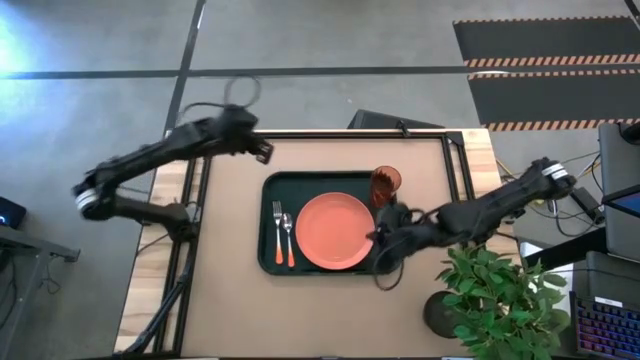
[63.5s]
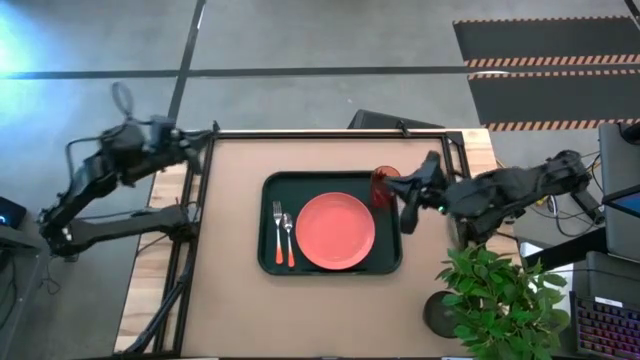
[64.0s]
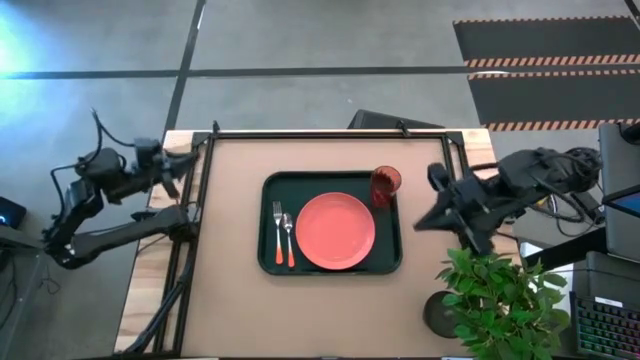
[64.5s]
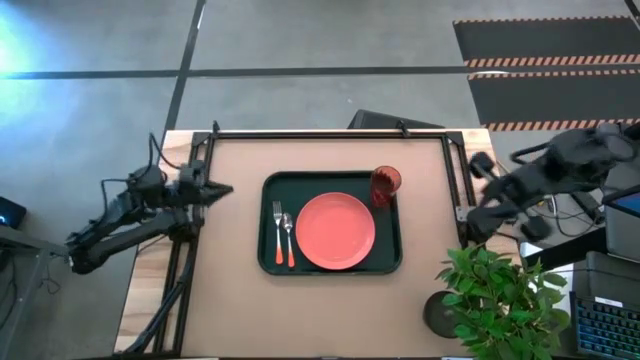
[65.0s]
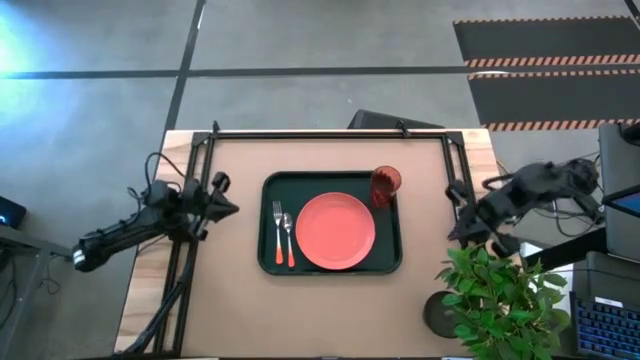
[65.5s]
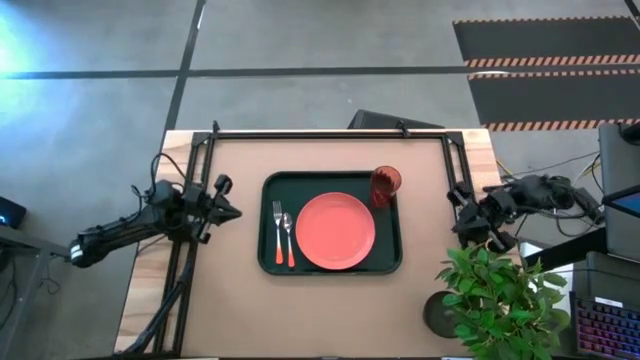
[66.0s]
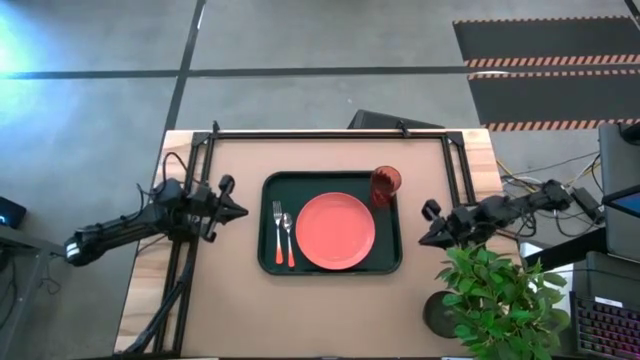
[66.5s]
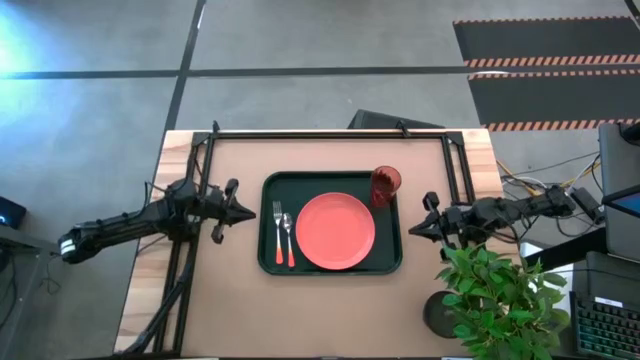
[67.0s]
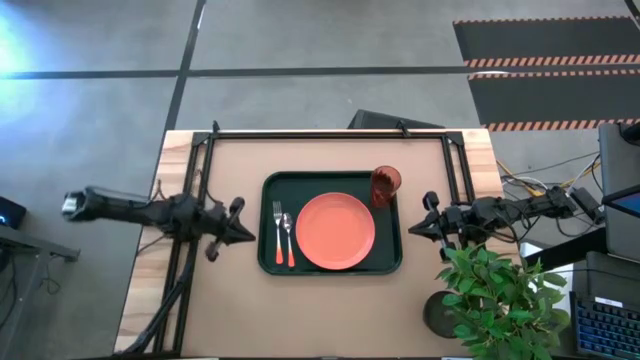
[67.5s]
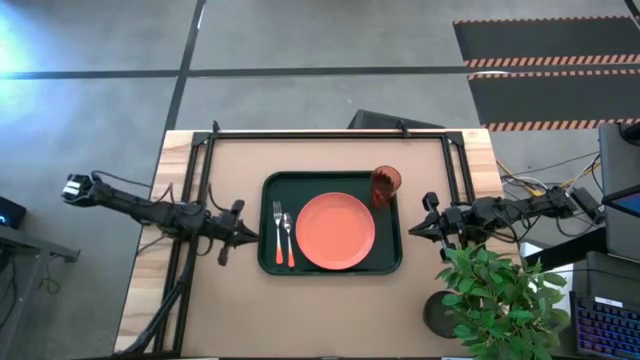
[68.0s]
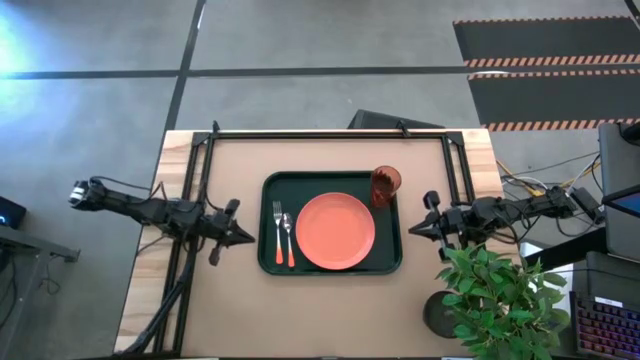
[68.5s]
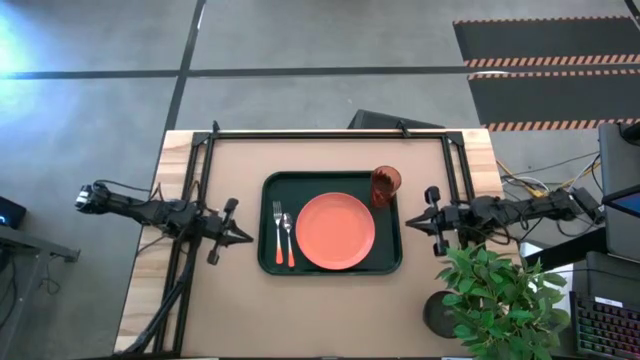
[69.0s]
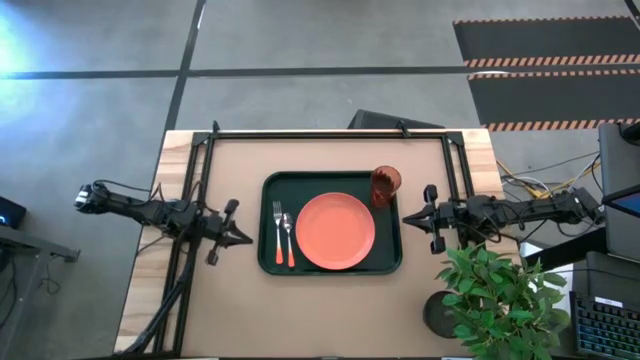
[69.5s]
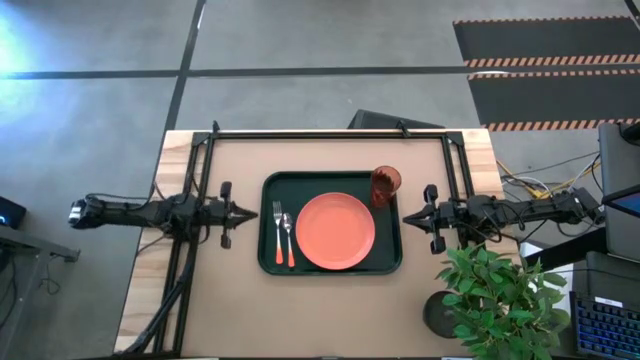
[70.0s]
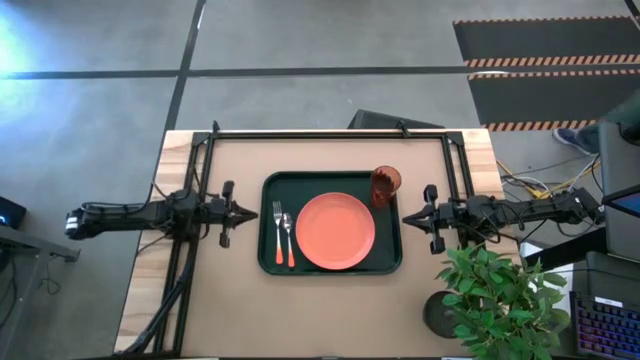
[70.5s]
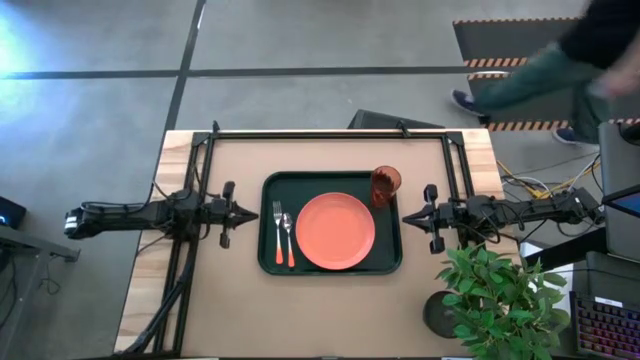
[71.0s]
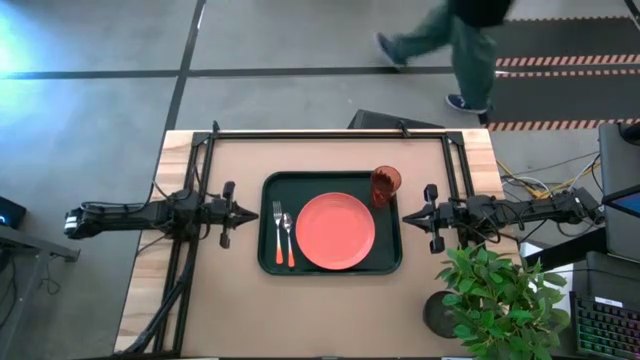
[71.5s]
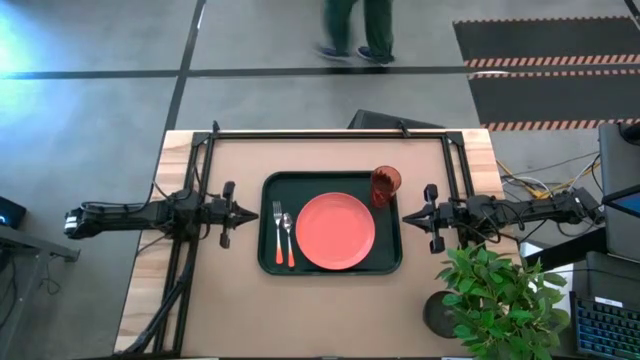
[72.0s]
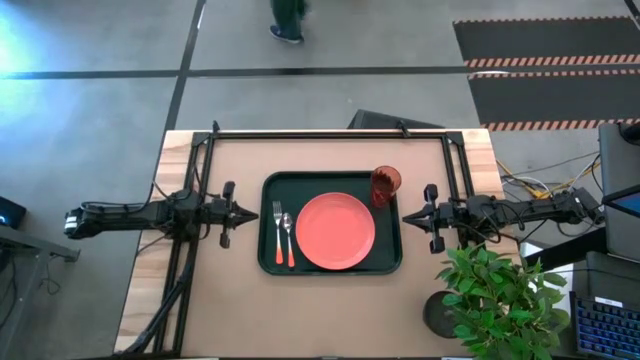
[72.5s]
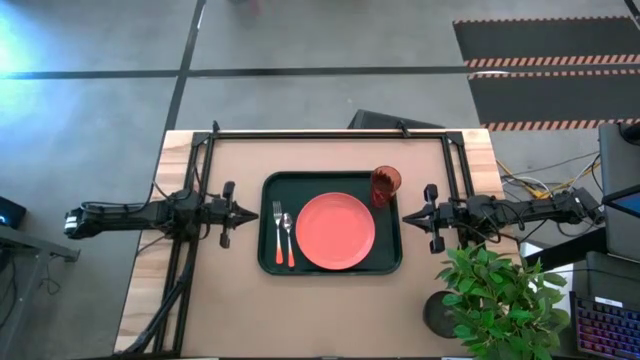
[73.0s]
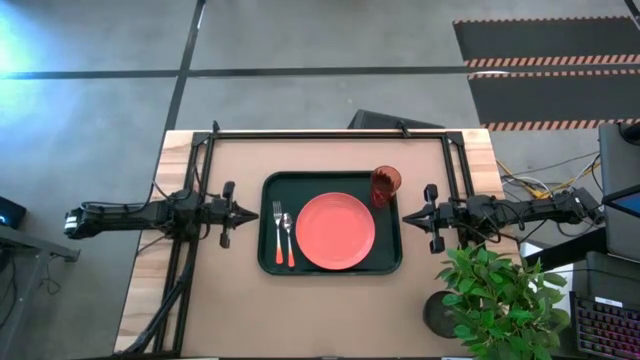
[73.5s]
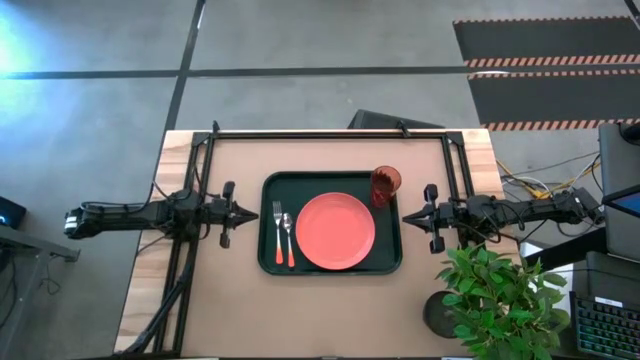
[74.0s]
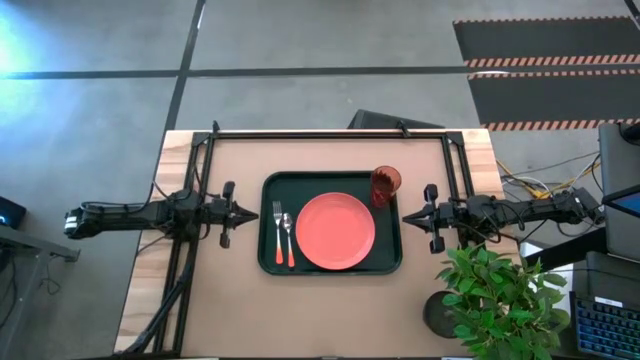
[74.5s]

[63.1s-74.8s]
Task: Pick and place plate/cup/fork/spoon on tray
Return to Home Position

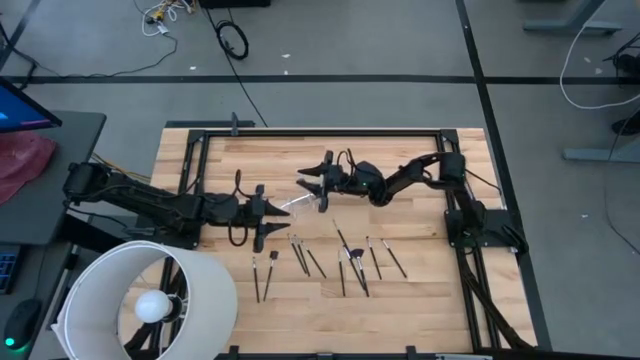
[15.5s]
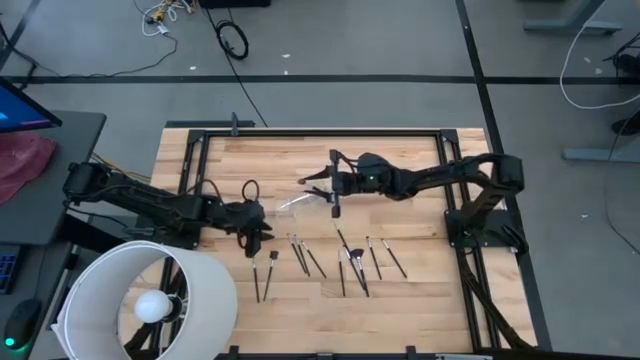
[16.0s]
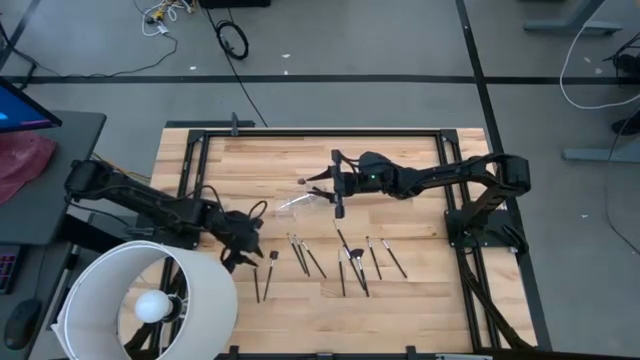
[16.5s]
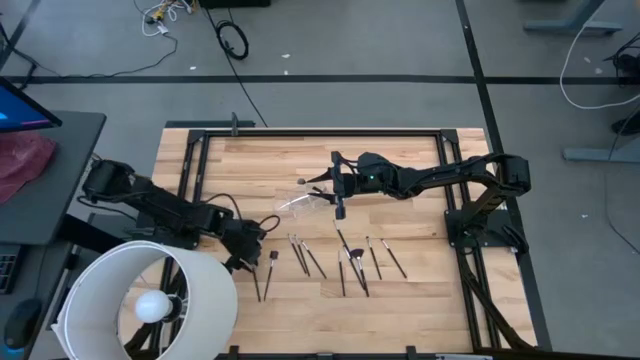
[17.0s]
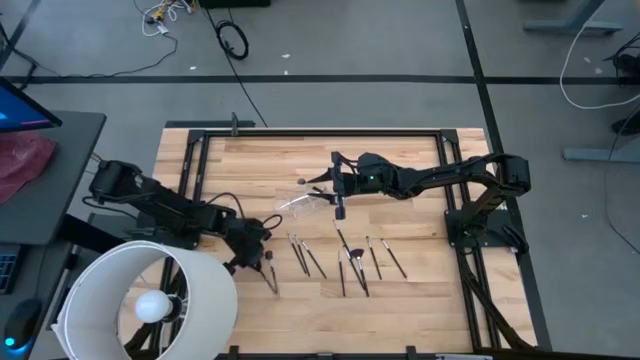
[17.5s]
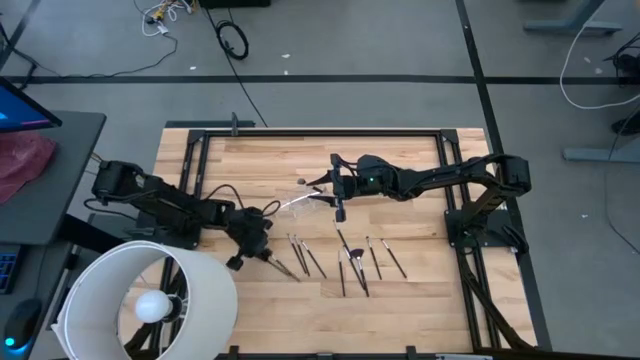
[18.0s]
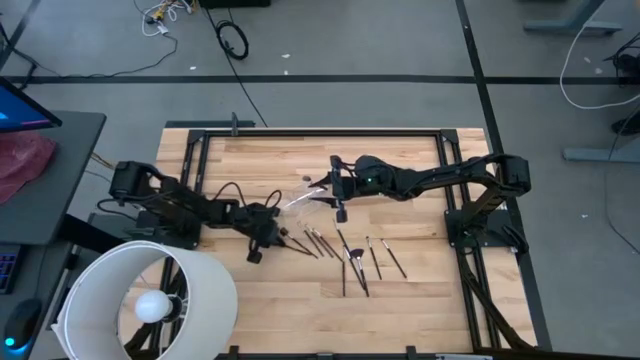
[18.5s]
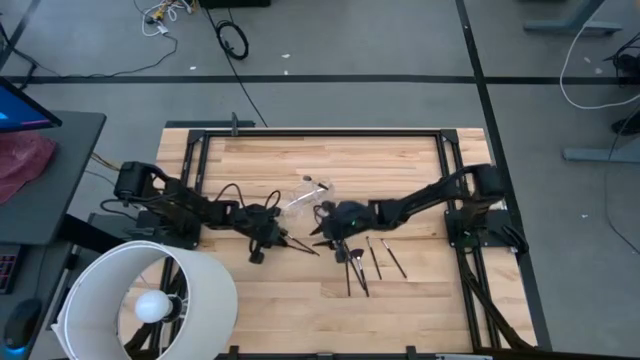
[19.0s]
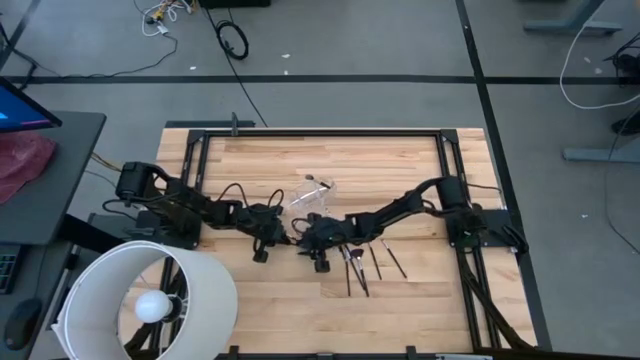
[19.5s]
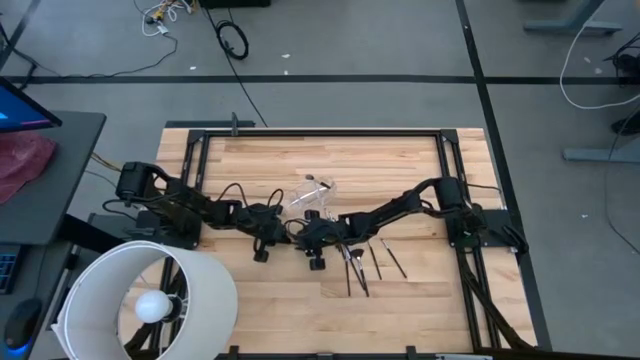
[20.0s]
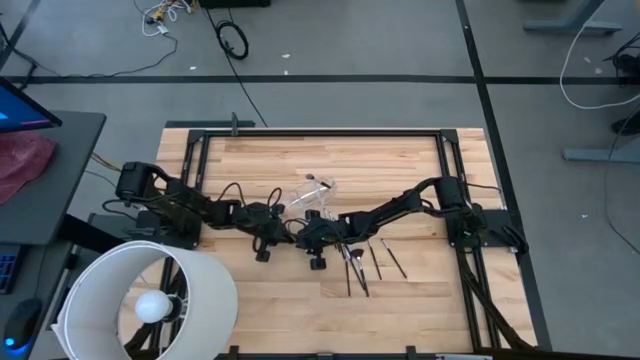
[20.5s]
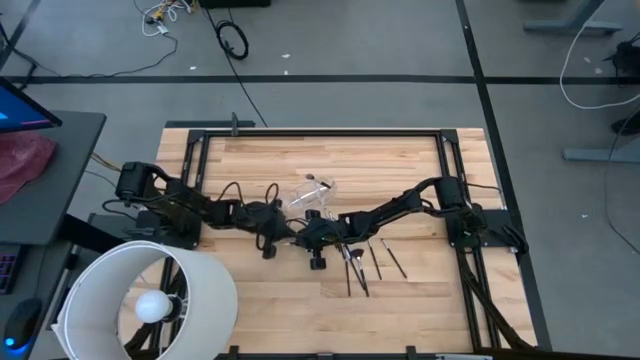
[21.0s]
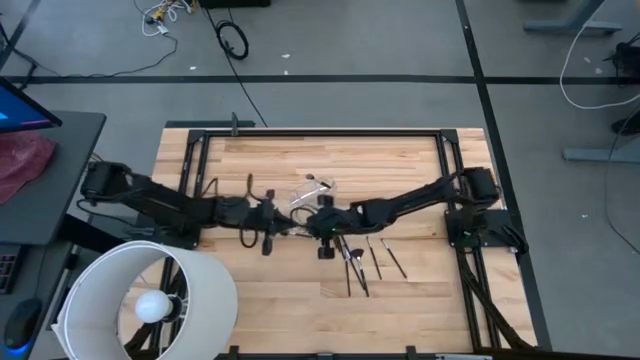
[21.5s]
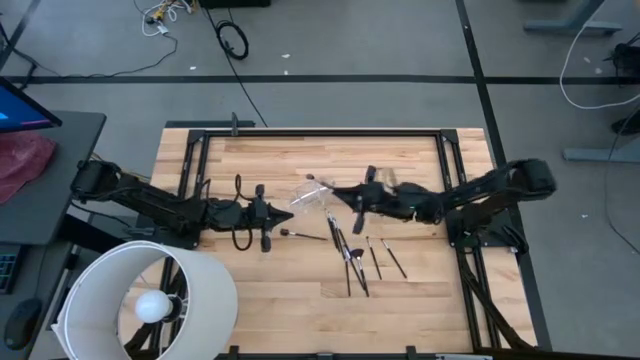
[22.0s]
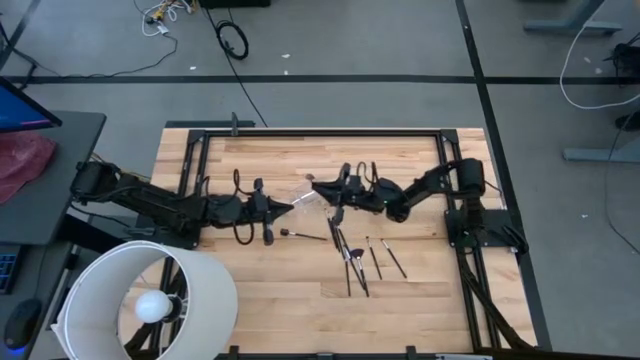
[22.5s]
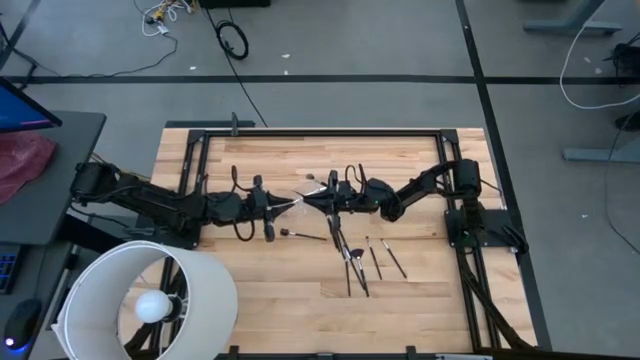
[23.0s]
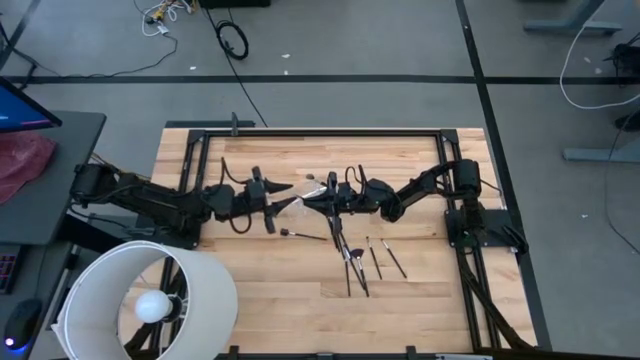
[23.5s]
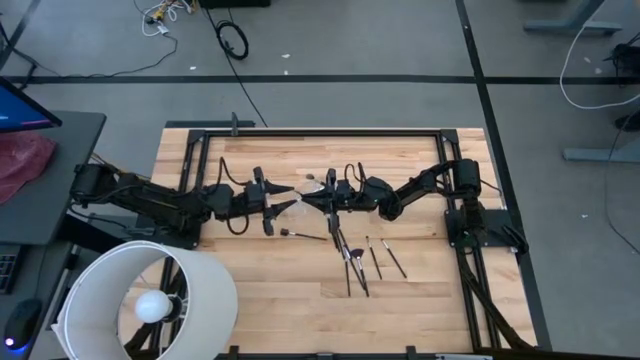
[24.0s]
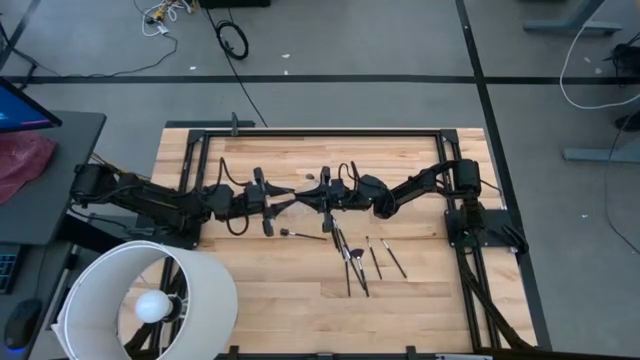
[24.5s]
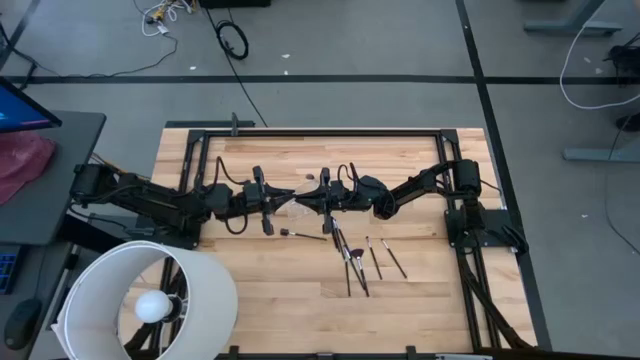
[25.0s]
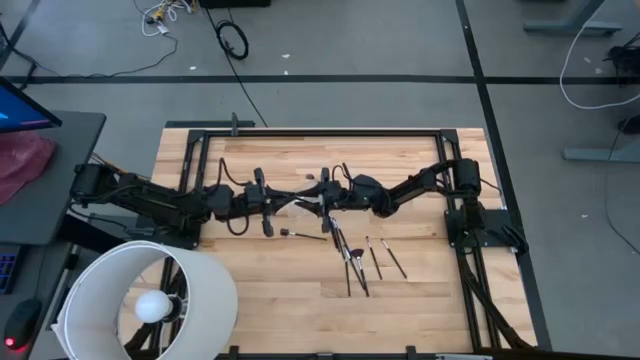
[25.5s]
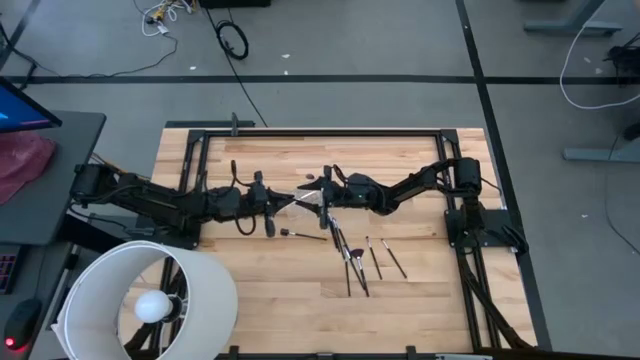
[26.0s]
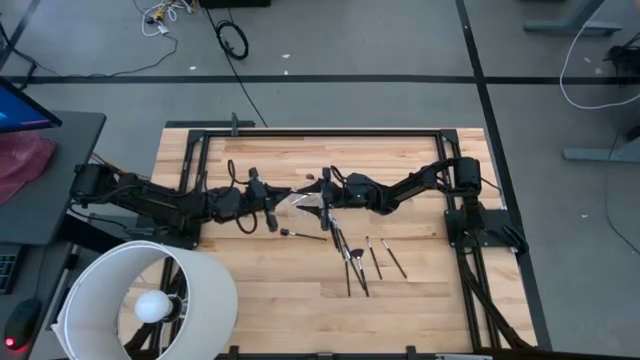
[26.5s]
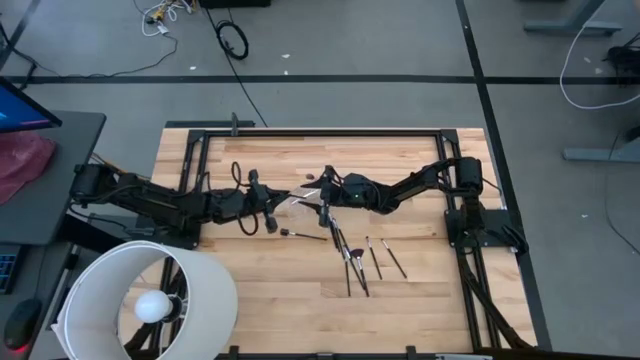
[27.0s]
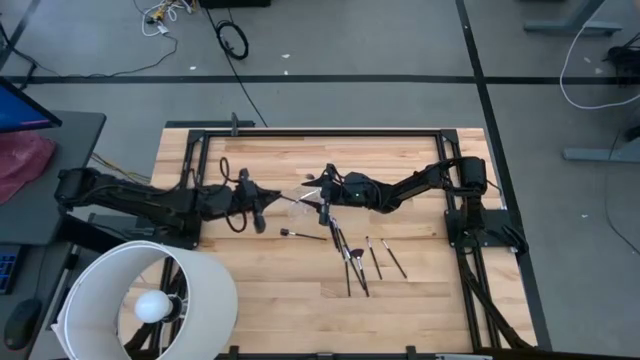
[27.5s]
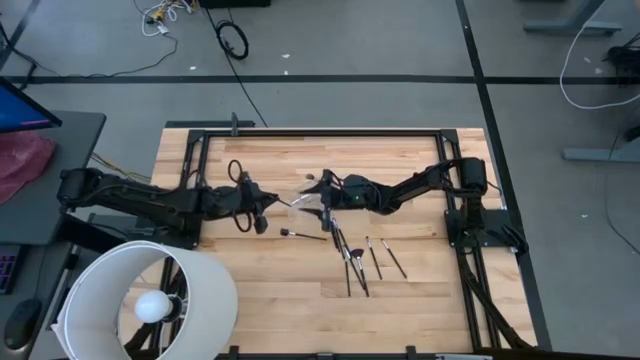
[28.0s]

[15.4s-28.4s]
Task: Put items in baskets/containers
Put the black eyeshadow brush into the transparent organizer
